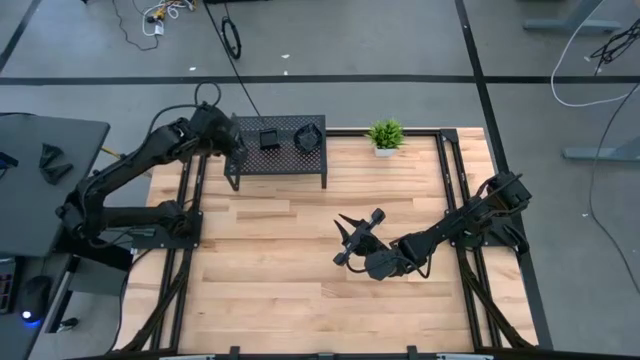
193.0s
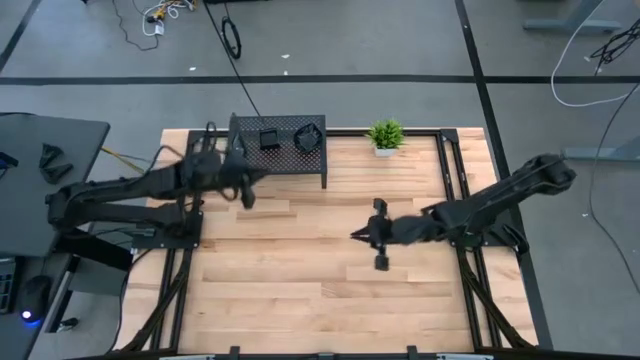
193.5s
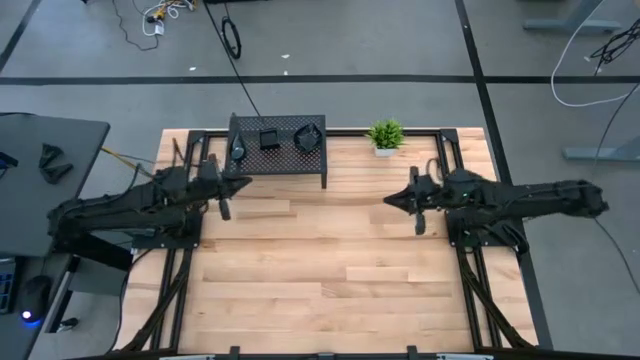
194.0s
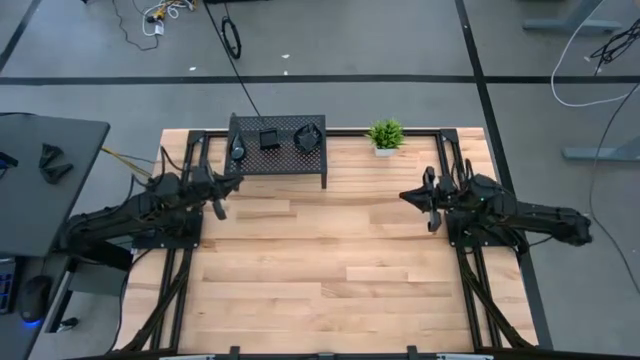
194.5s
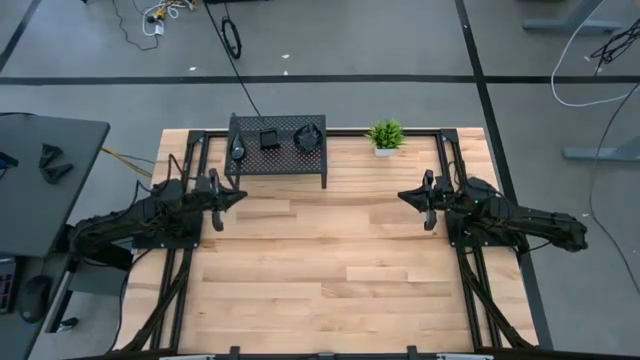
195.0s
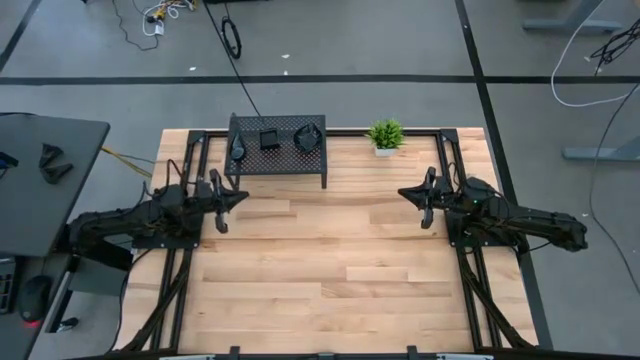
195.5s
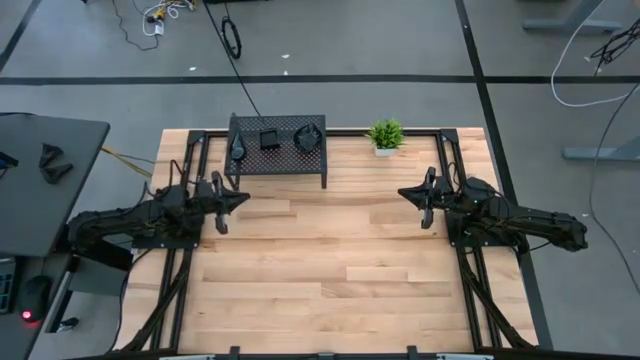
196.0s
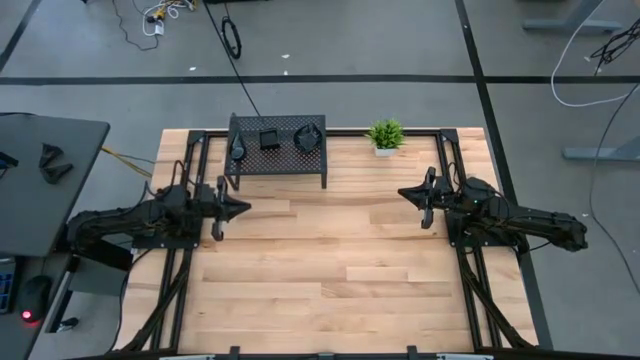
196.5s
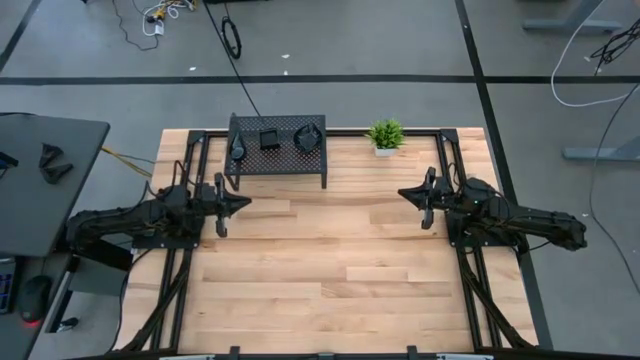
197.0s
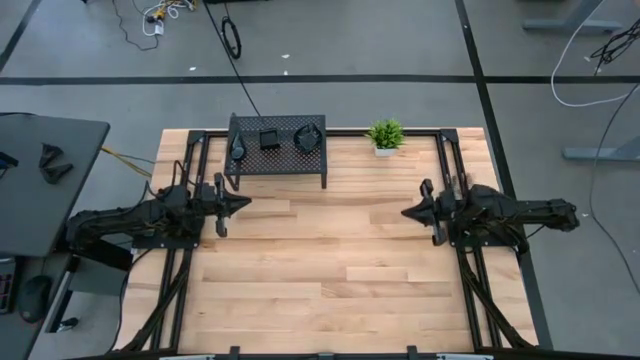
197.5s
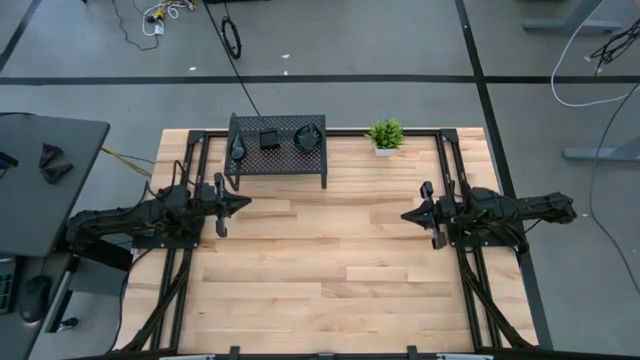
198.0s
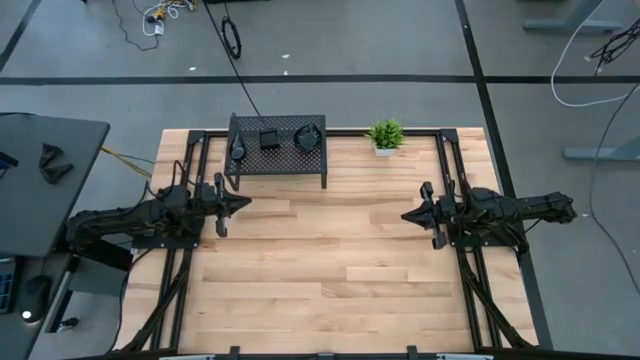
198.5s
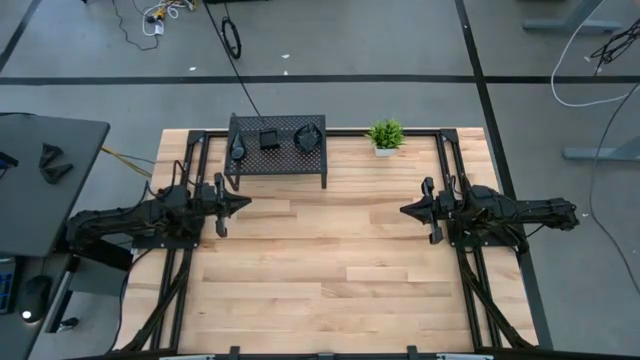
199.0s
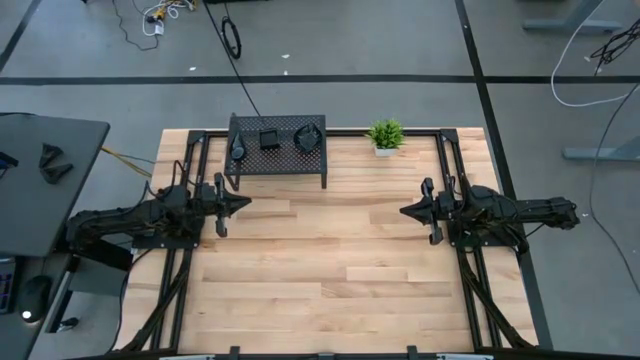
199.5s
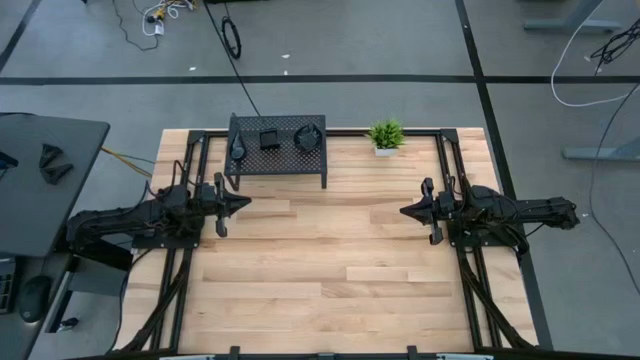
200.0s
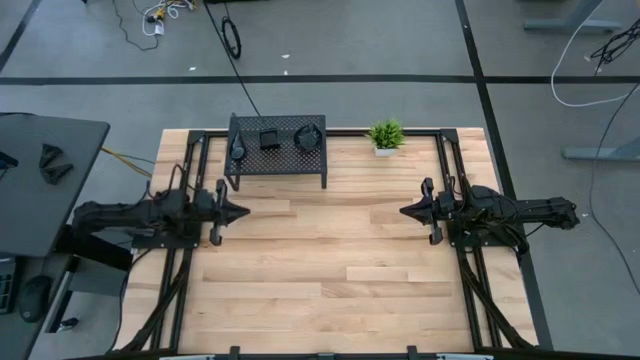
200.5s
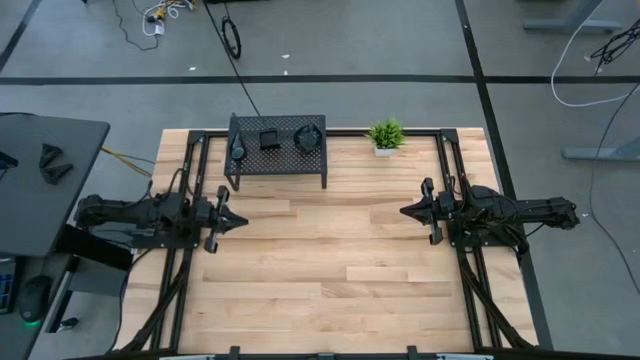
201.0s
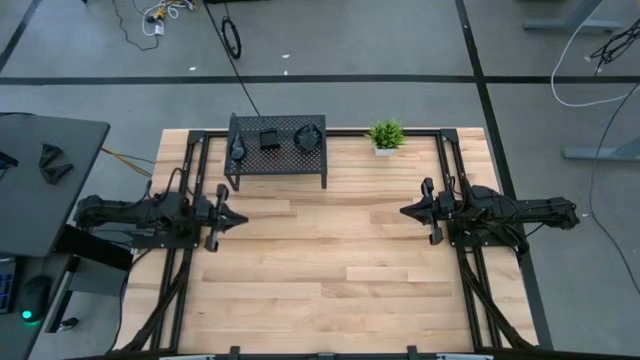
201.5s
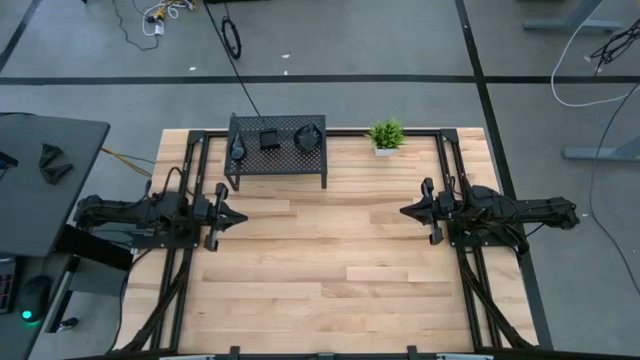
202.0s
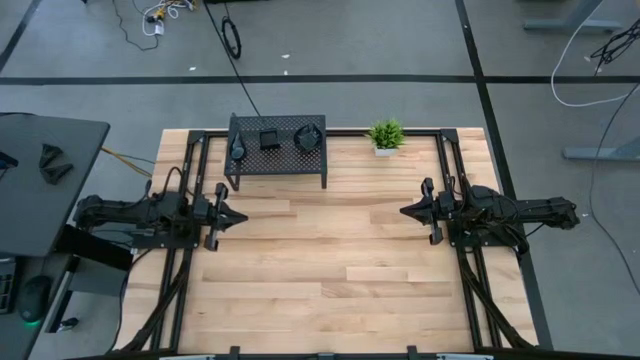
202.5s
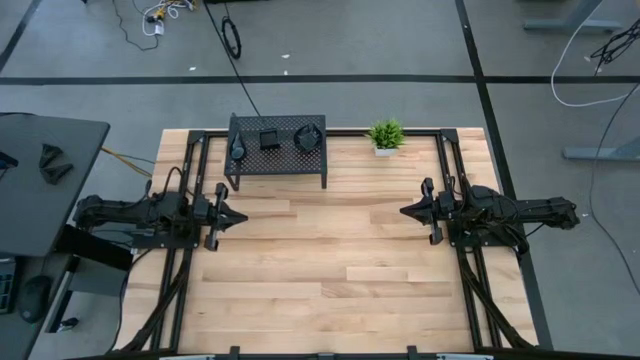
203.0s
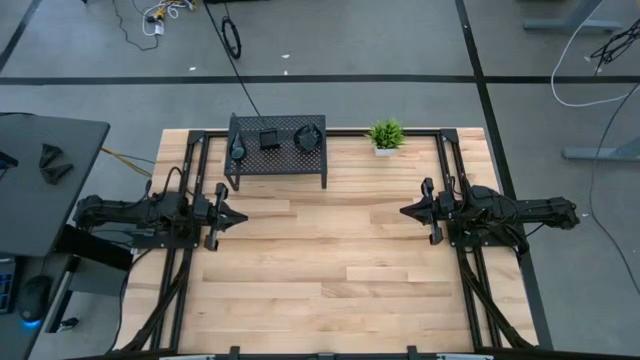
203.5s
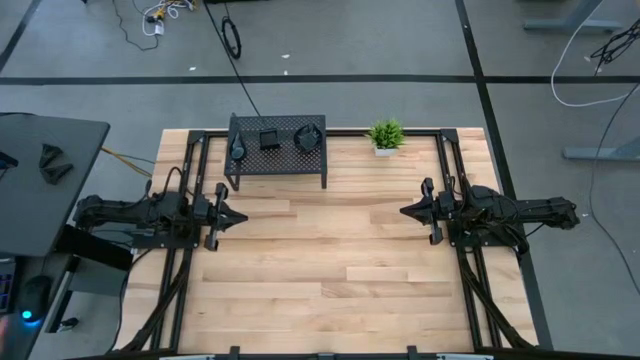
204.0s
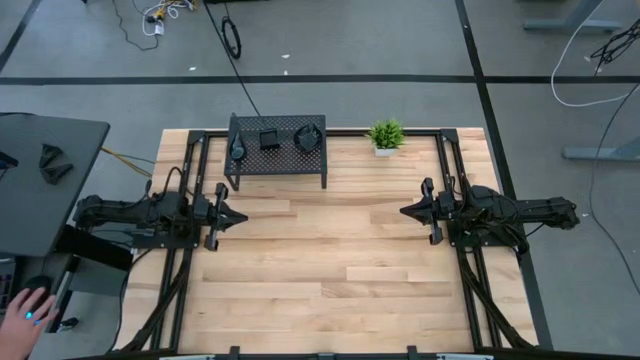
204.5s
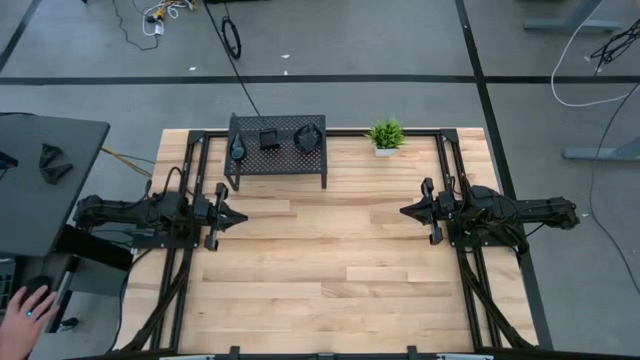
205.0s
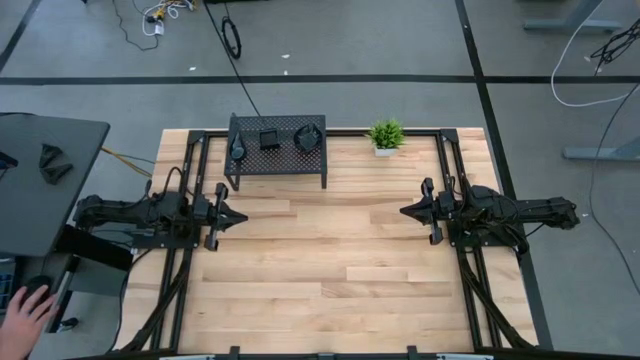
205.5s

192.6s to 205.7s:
Task: Pick & Place Mini shaped plates
Return to Home Position

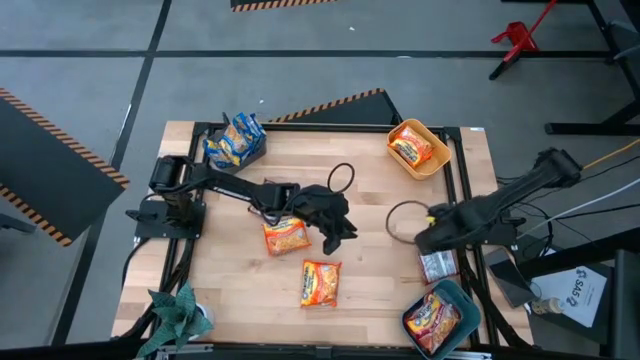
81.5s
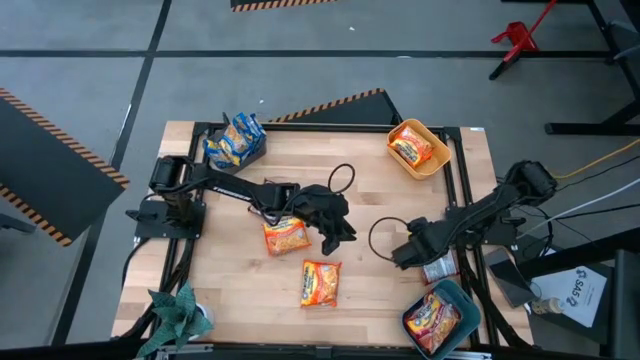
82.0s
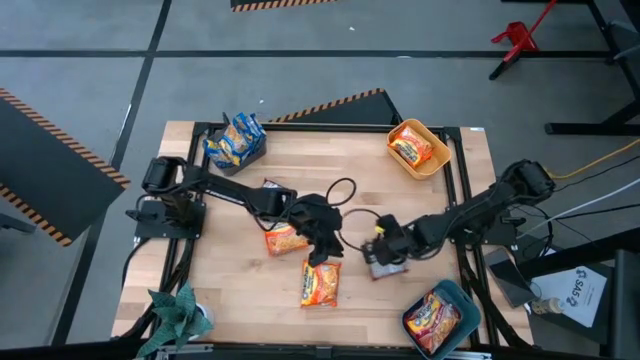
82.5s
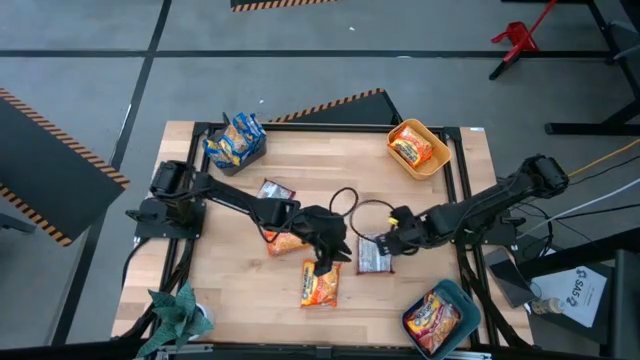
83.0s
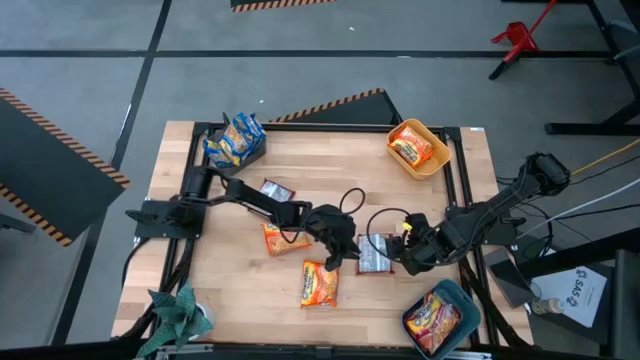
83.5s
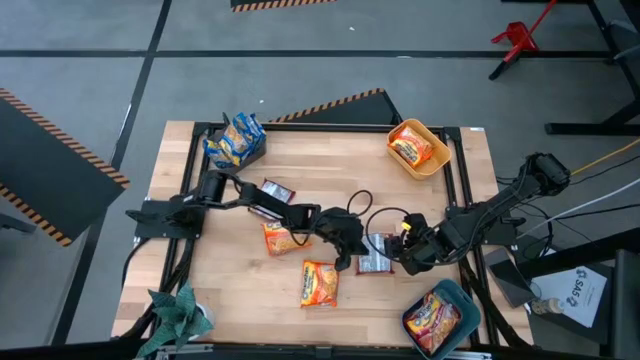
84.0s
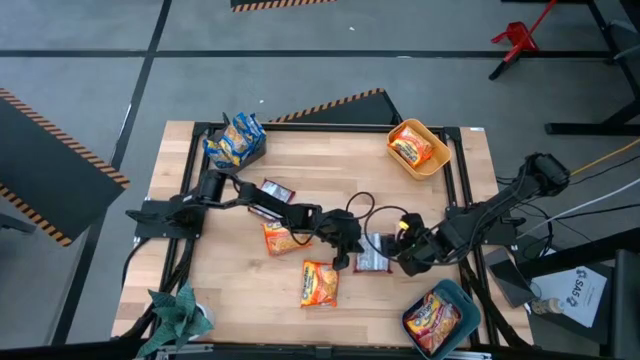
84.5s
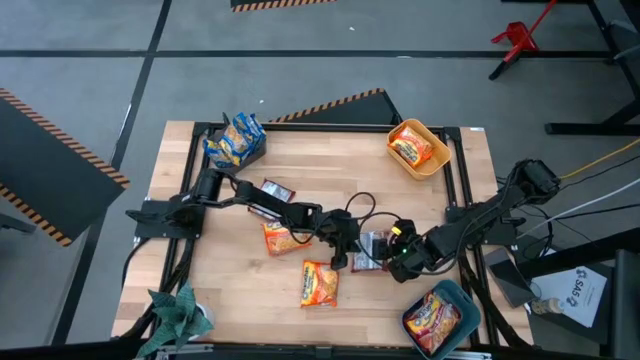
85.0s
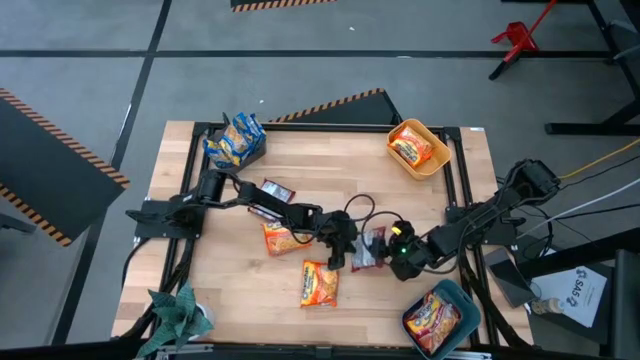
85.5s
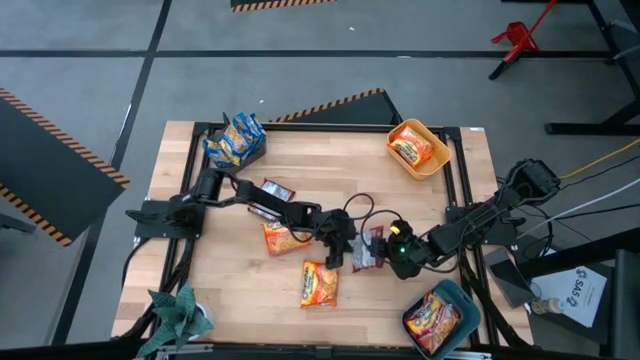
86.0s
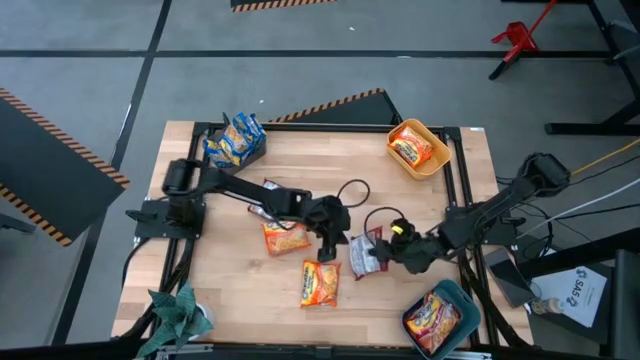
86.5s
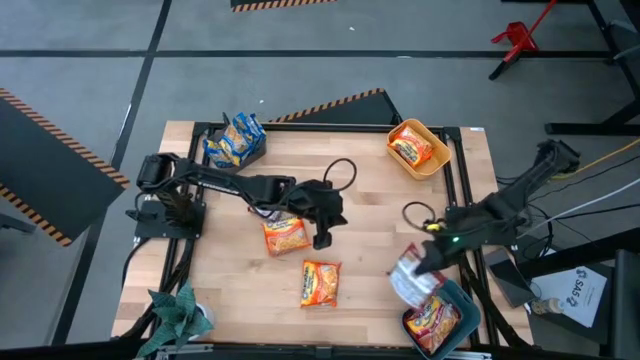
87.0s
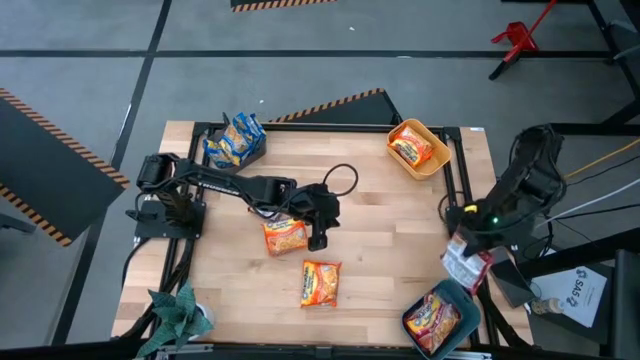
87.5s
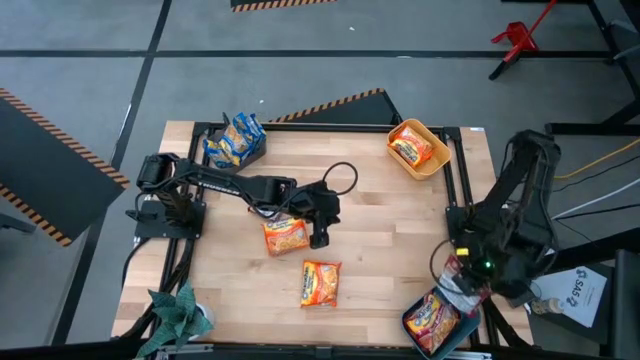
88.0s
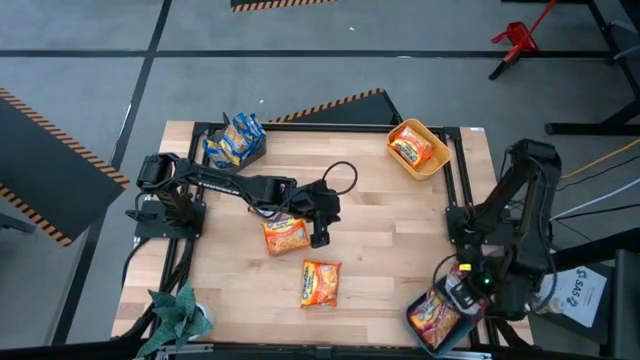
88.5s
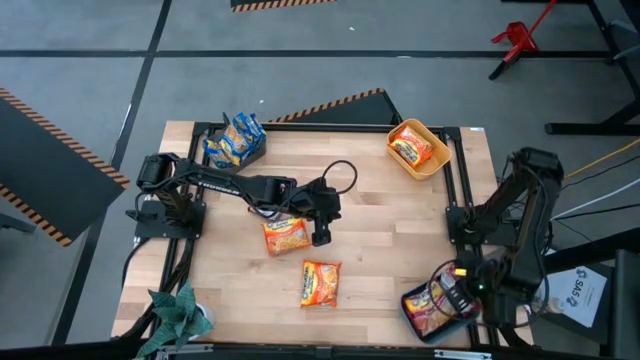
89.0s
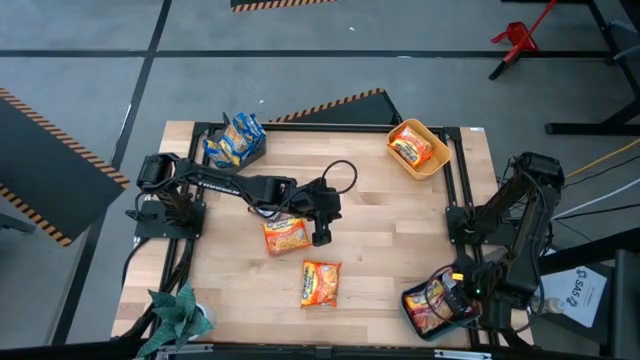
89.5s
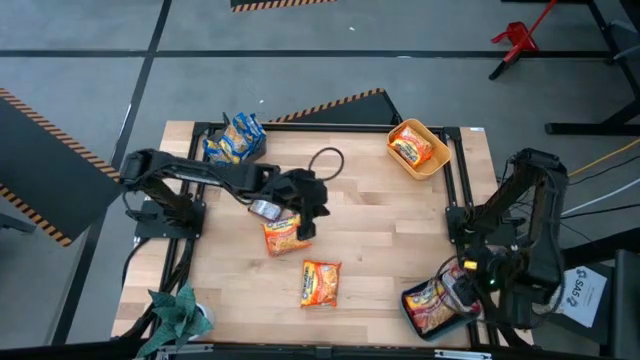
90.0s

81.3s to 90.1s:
Task: Sort Maruchan noodles
Put the red noodle pack into the blue bin
